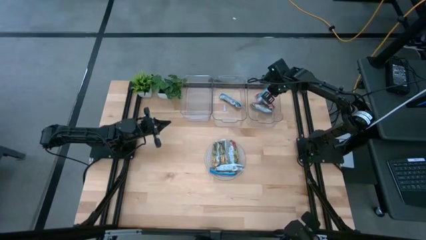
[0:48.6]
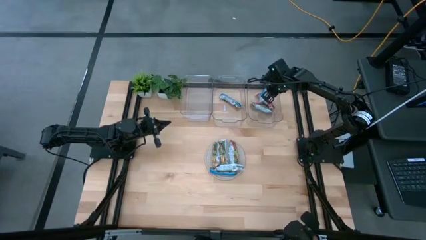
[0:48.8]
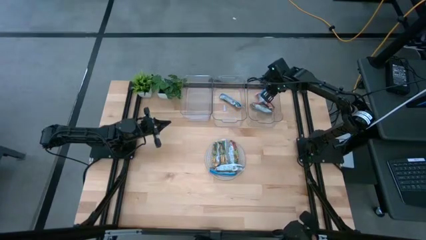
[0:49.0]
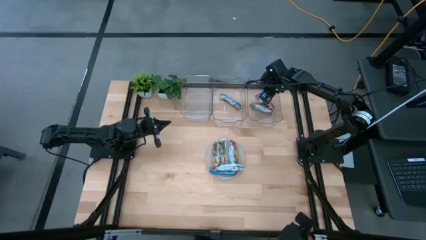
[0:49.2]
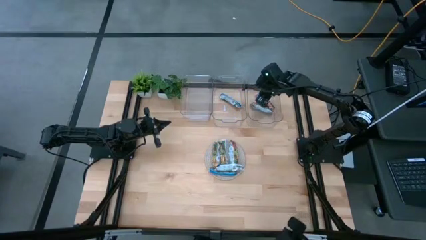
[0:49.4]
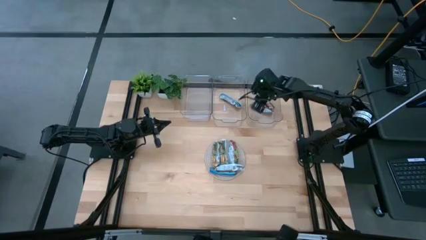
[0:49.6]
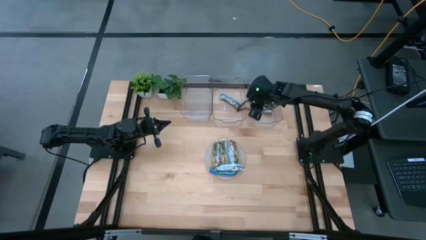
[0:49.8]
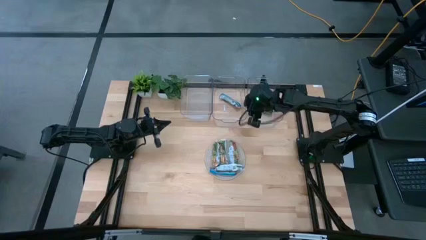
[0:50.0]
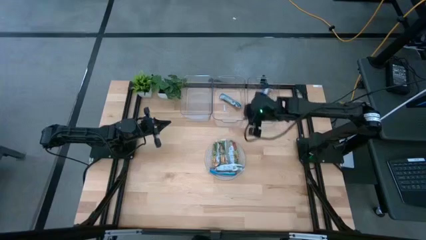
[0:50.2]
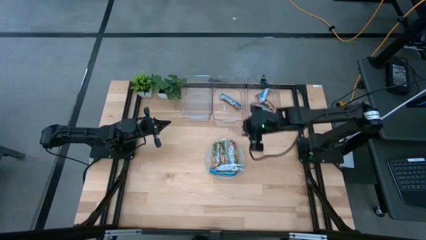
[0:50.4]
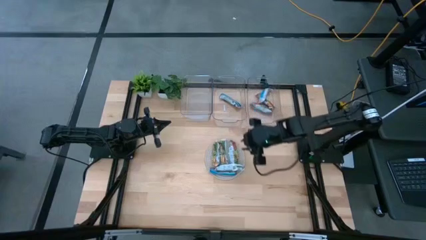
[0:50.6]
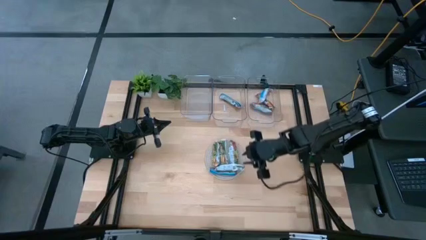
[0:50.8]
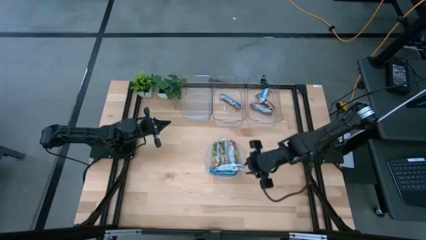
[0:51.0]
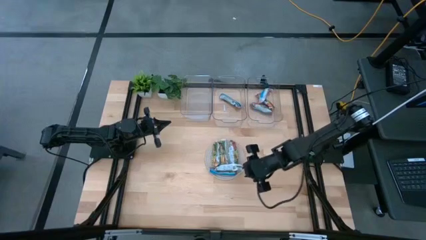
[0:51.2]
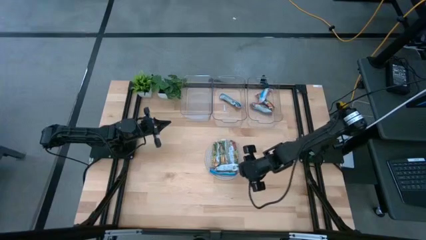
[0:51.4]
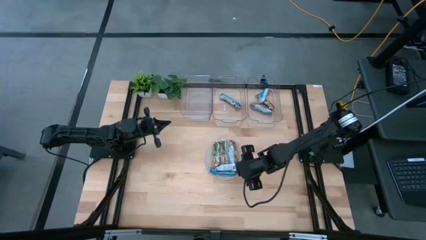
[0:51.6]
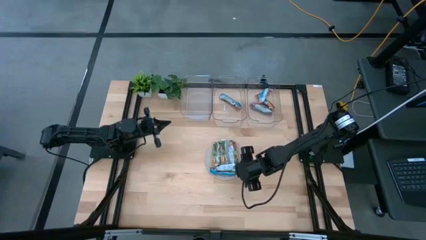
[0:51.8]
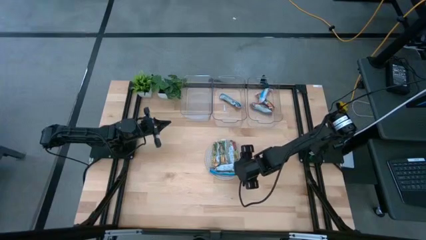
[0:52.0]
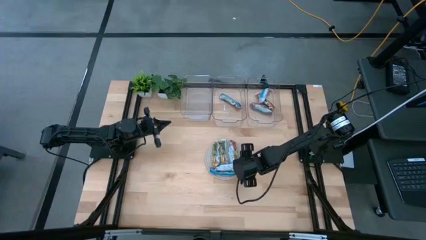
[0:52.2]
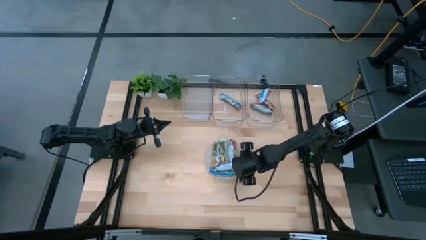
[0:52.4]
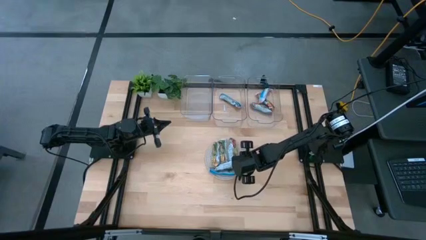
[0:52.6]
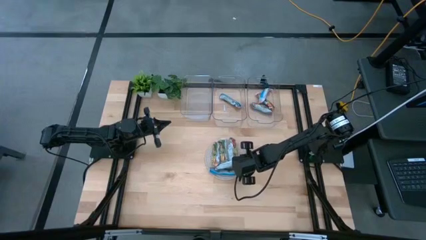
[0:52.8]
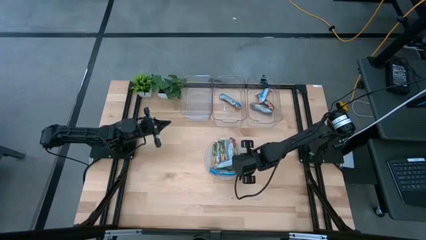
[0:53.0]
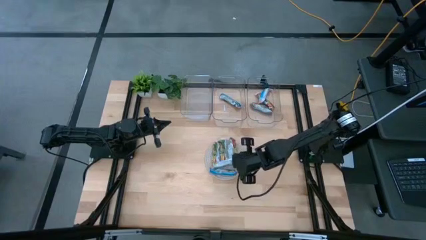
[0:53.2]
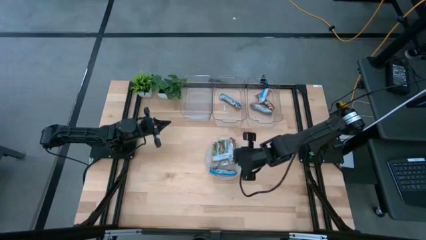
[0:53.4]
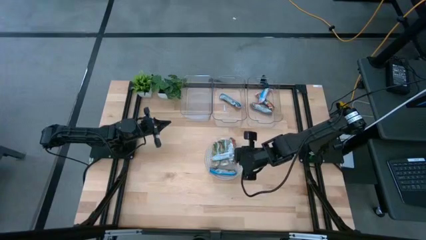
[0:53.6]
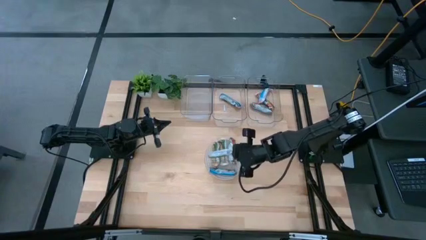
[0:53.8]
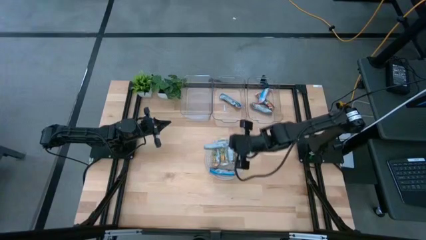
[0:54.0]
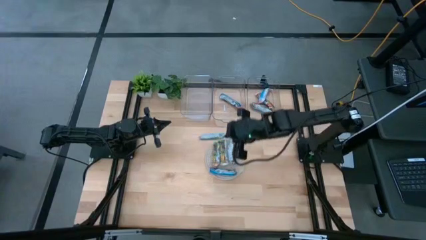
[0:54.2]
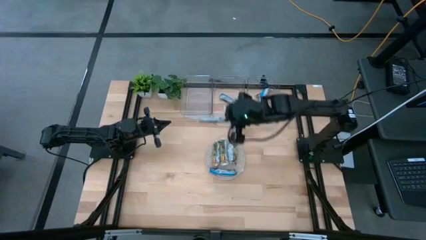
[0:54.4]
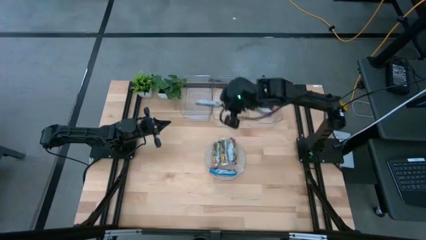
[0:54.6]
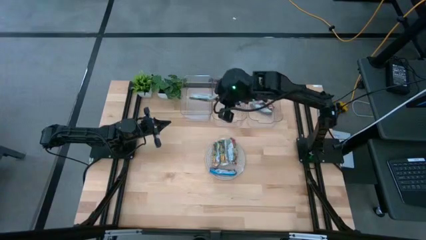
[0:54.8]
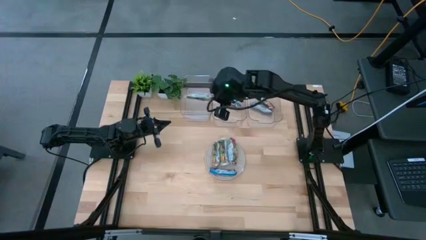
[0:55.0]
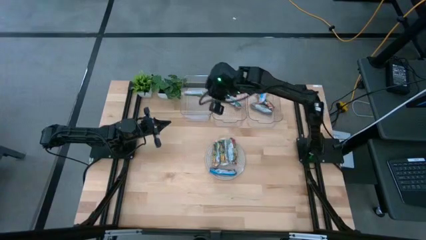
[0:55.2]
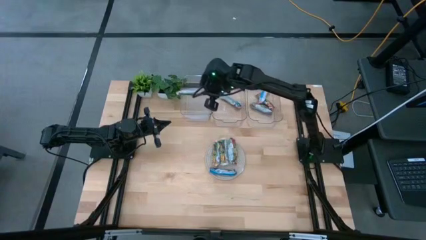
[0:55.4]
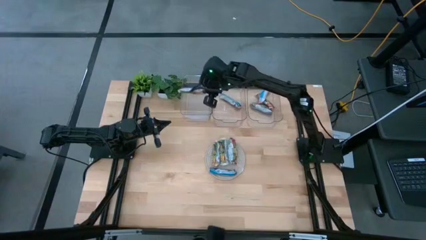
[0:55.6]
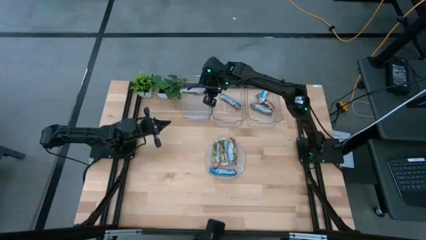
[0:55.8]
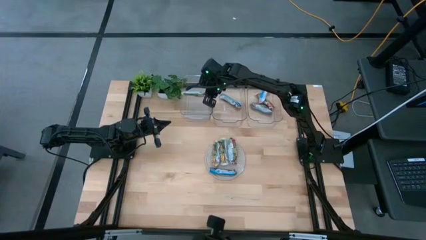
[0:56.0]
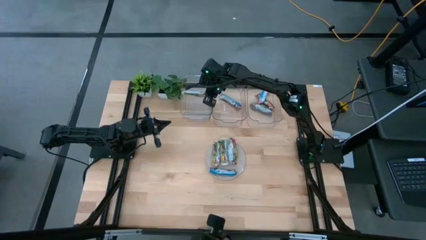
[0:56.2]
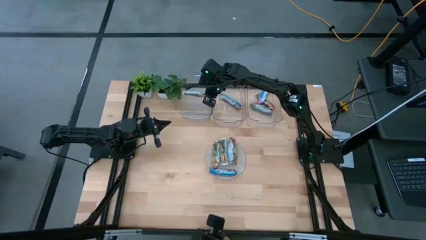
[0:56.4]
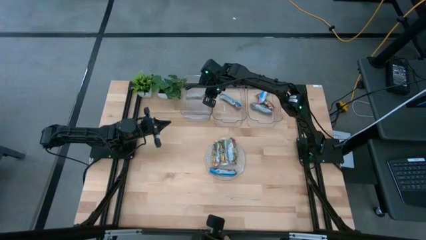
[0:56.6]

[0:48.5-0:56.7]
Task: Pick and place Granola Bars by type
Put the yellow granola bar into the left transparent bin

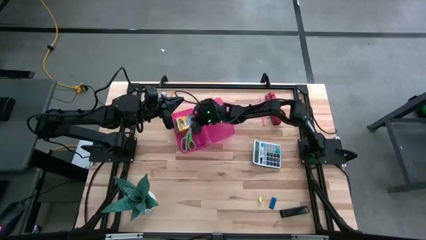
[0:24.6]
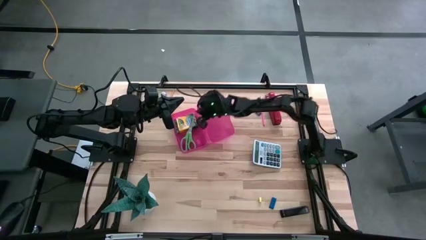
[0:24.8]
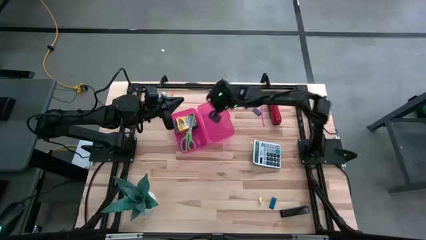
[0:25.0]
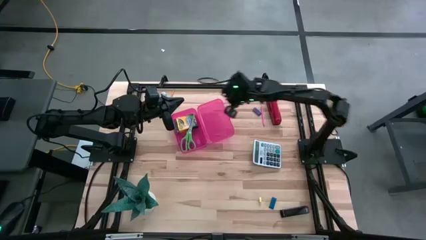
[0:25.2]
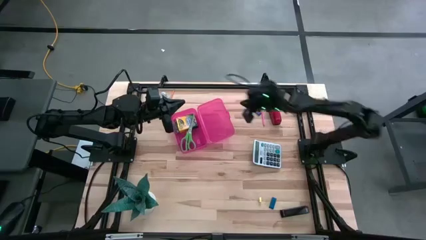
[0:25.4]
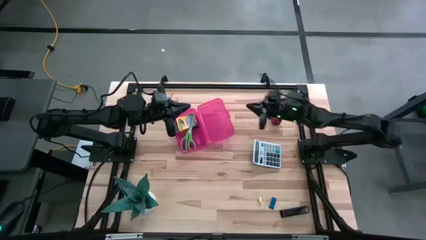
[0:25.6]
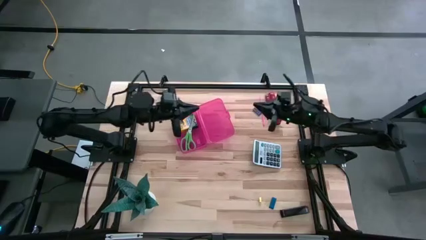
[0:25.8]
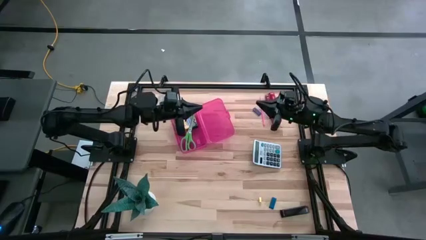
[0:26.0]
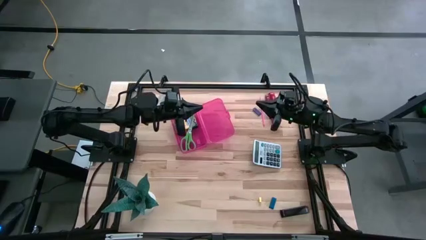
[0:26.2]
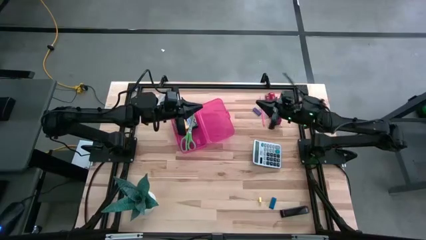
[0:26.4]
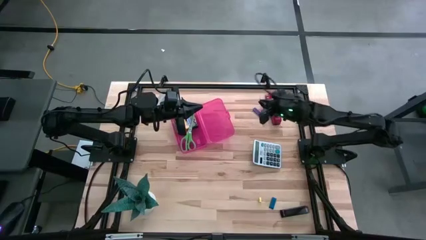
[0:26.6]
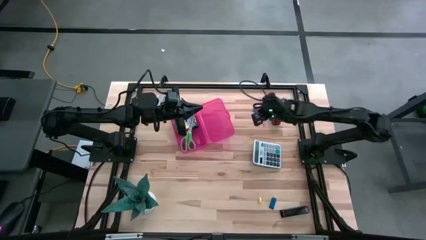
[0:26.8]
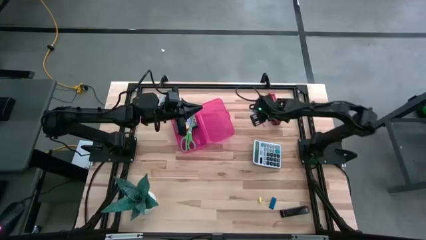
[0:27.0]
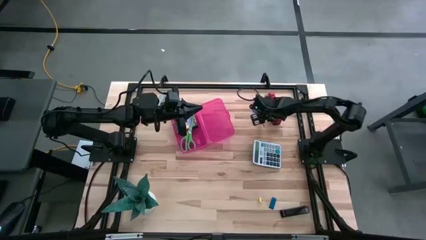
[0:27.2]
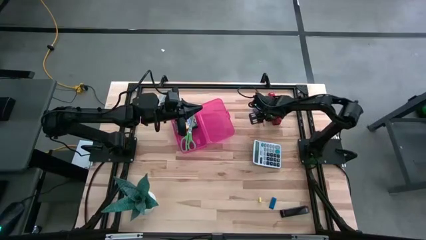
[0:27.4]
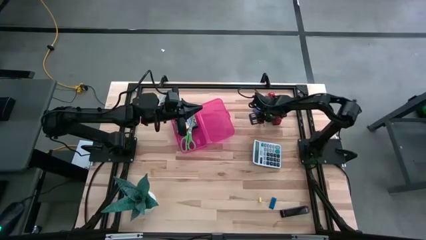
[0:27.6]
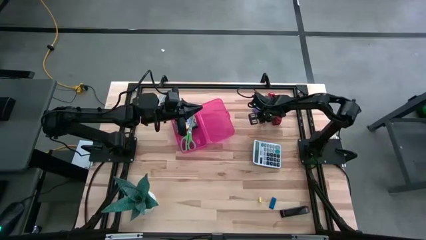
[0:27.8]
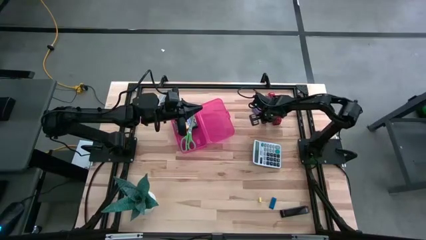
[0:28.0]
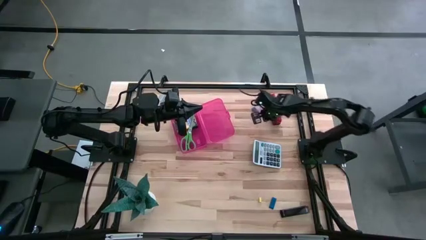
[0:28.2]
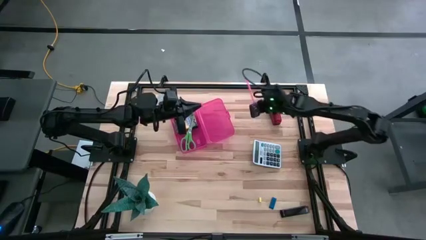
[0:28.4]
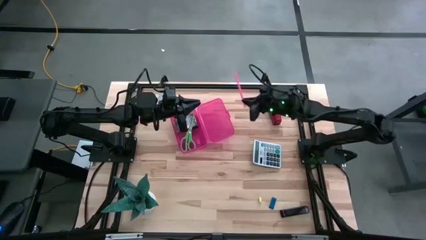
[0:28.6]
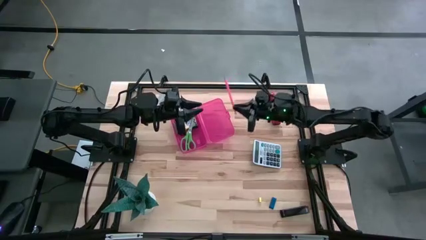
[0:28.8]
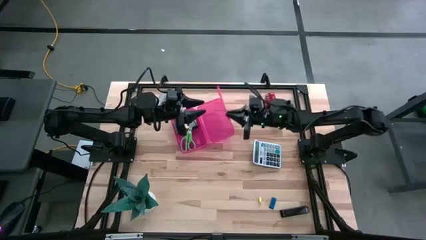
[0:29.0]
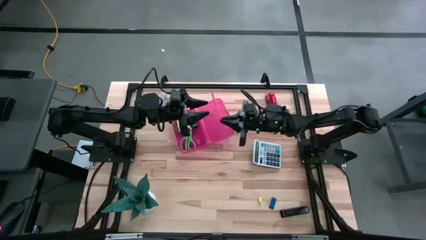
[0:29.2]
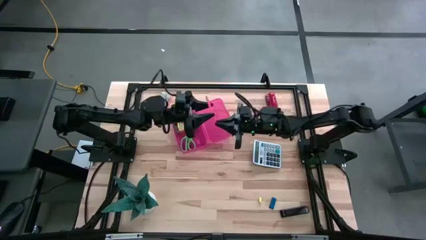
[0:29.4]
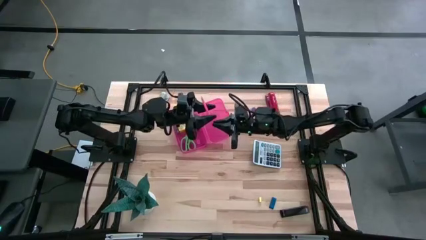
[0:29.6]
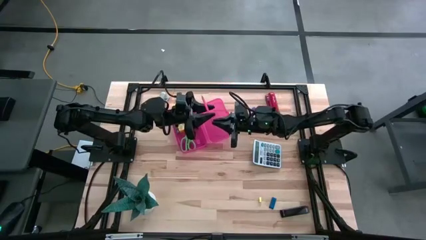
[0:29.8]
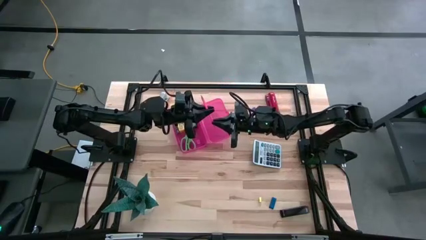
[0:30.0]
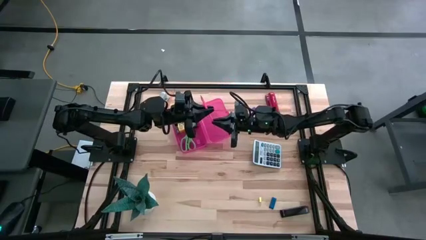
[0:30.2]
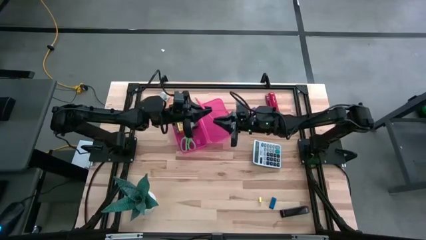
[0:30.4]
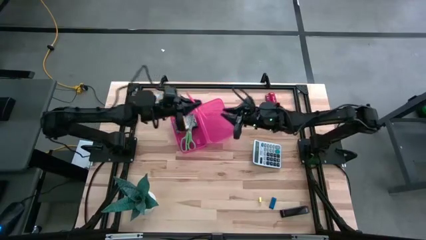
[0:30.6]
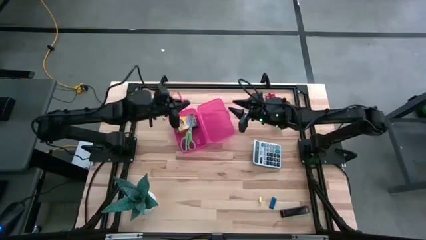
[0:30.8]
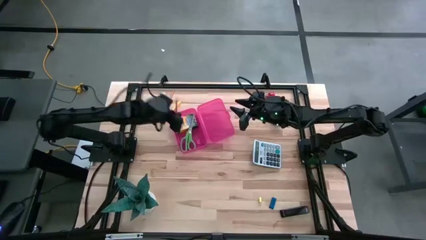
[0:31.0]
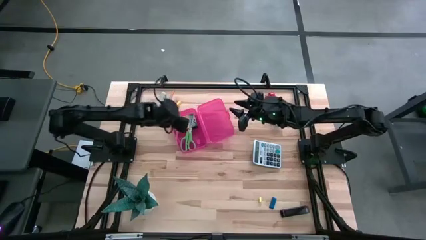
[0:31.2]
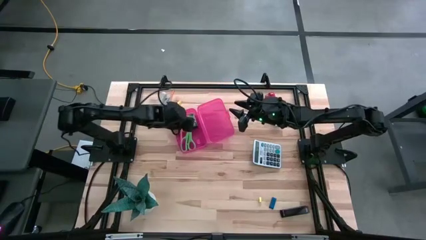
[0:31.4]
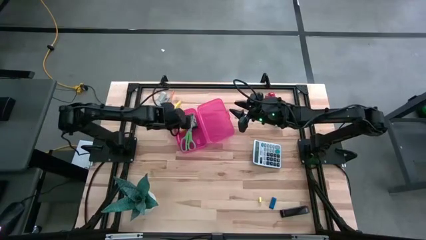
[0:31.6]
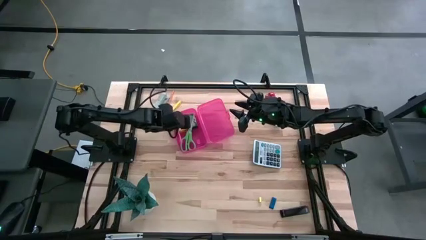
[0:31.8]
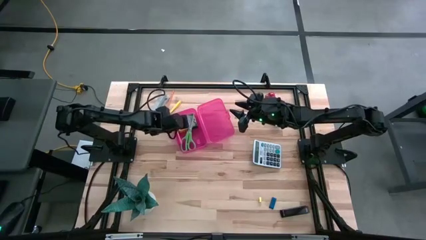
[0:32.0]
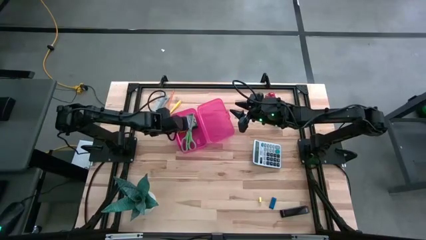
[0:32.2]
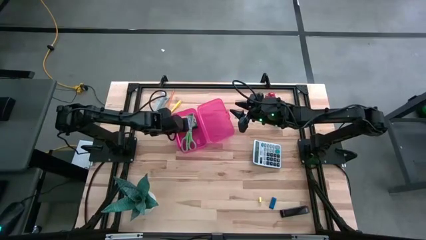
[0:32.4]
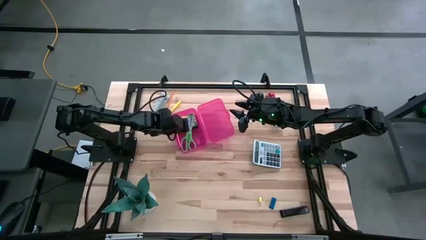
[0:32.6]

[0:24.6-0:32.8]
Task: Pack school essentials
Put the pink pencil into the pink pencil box
